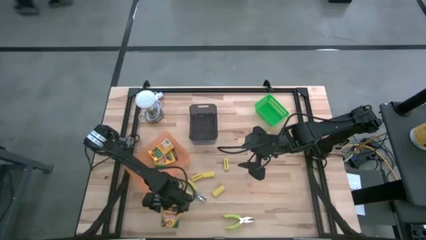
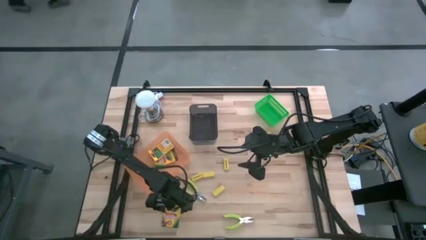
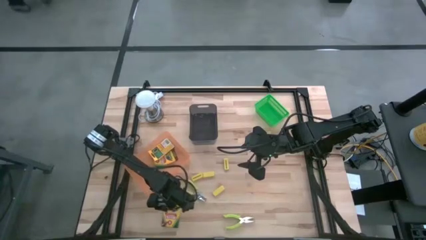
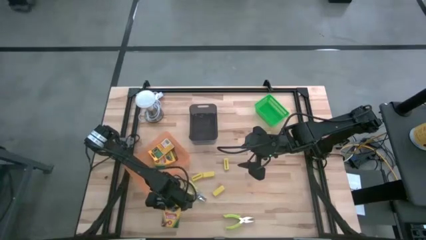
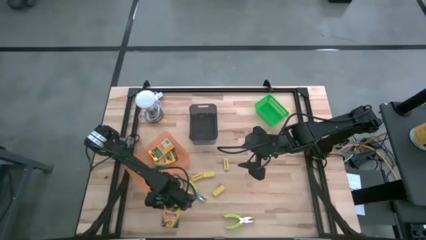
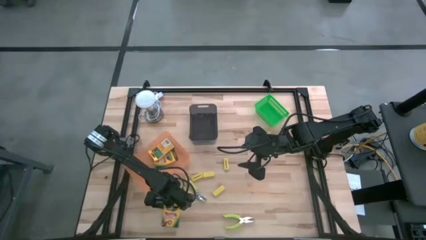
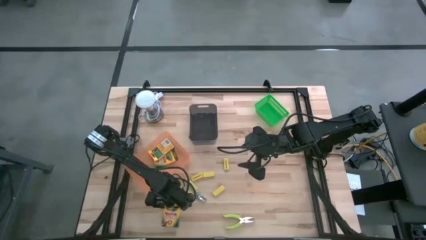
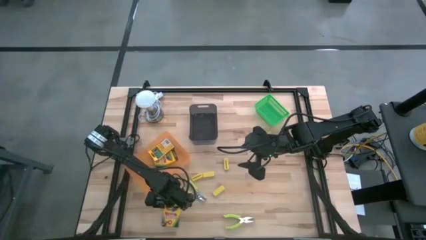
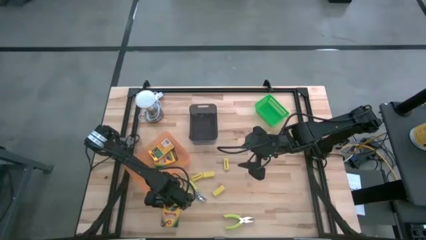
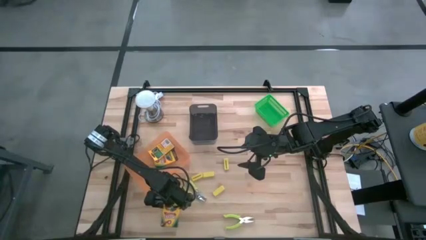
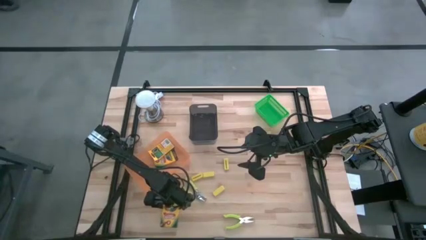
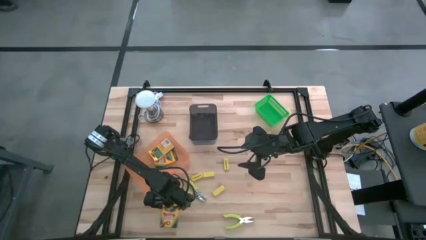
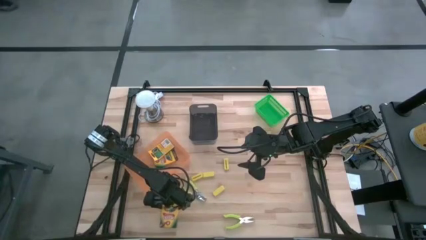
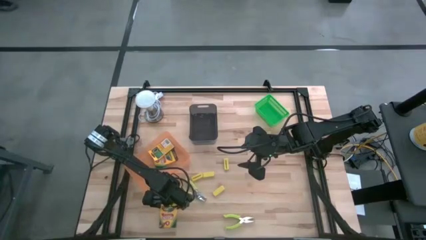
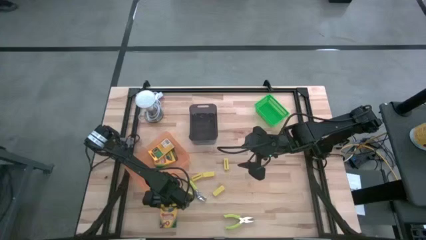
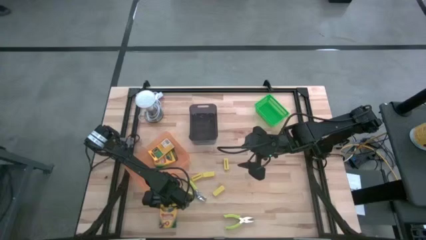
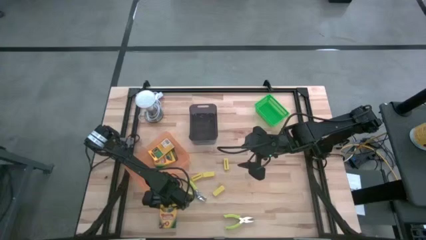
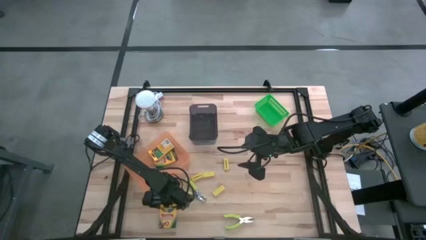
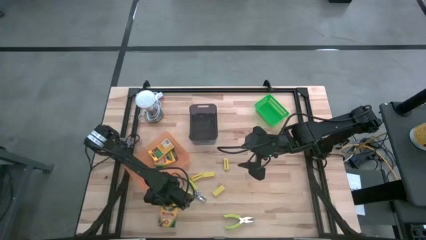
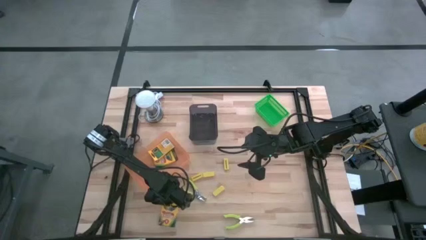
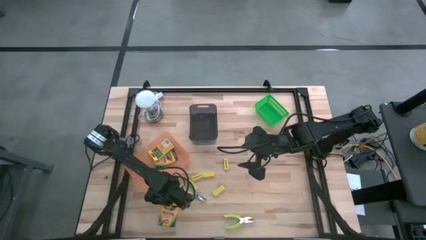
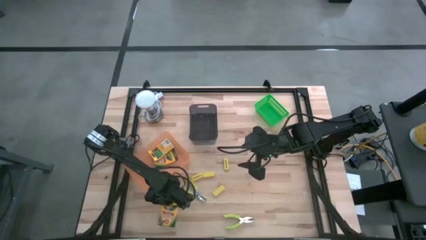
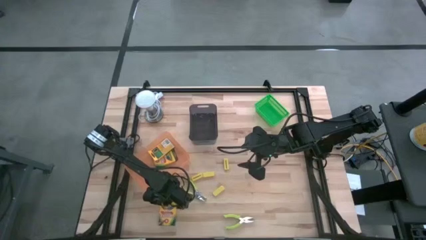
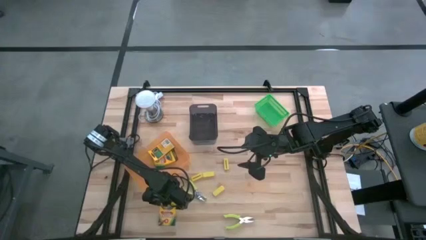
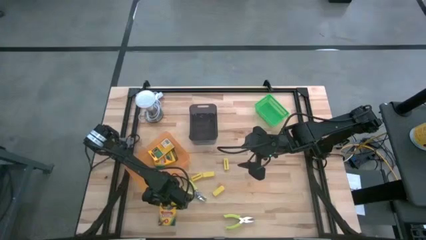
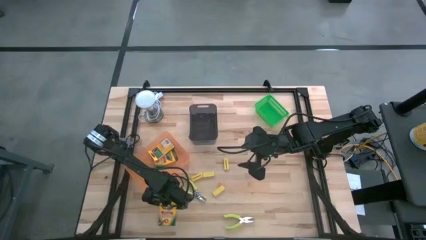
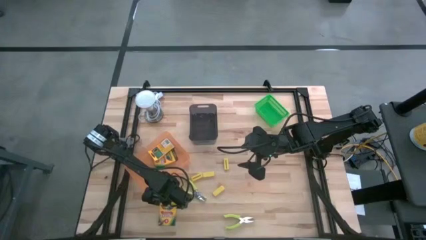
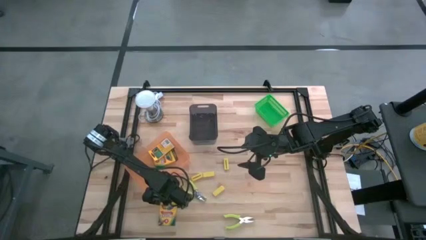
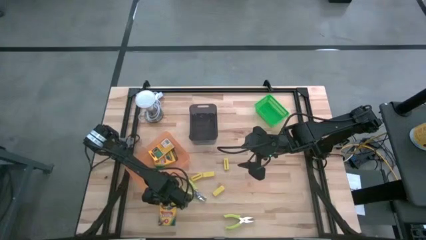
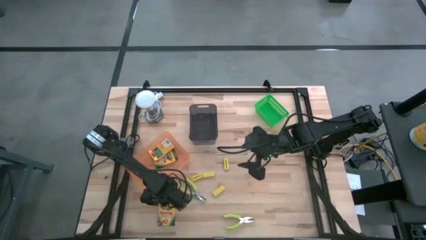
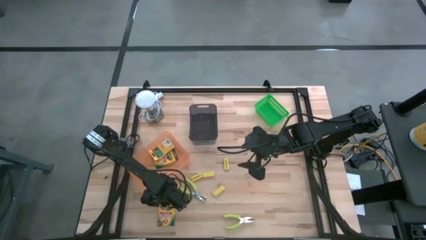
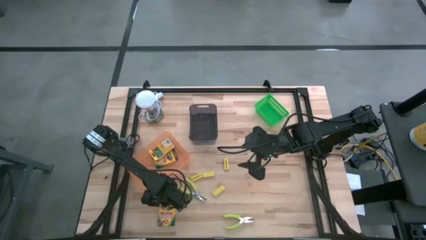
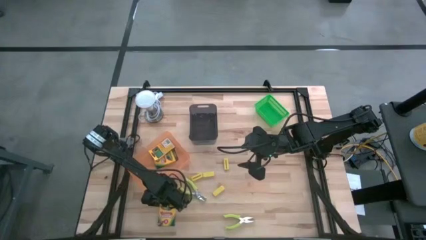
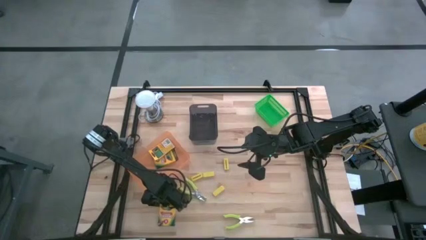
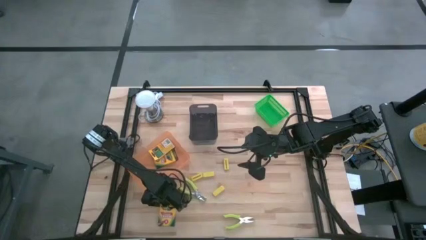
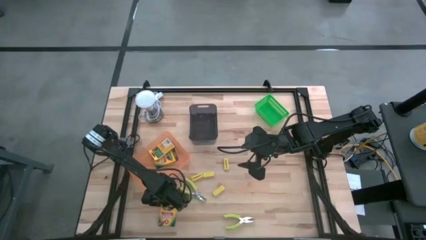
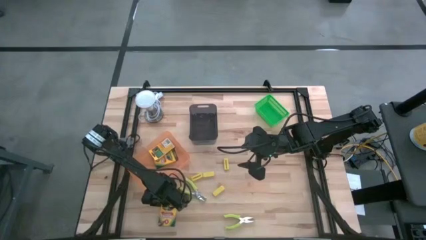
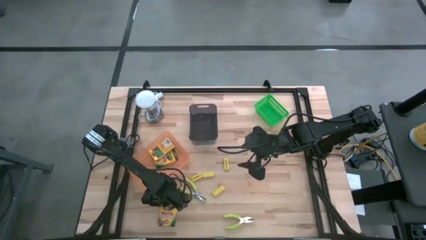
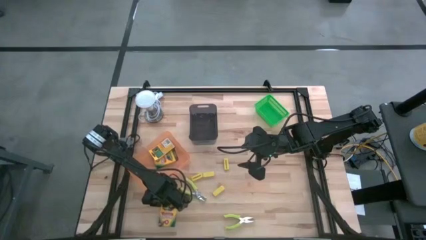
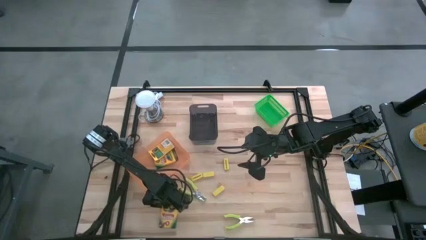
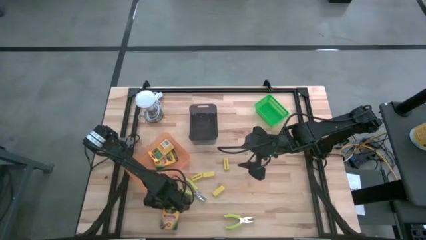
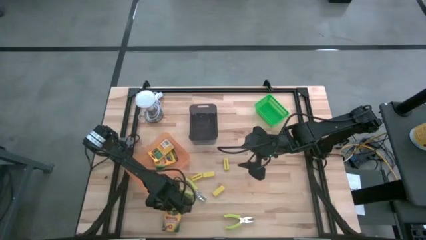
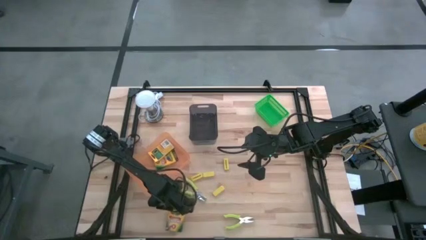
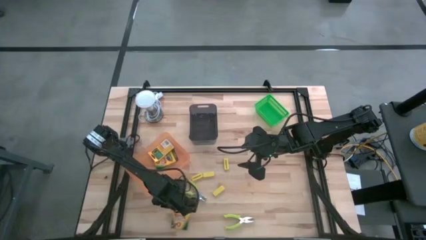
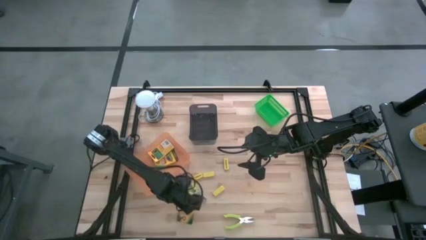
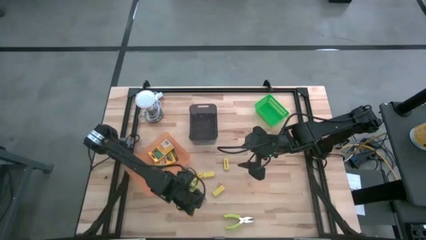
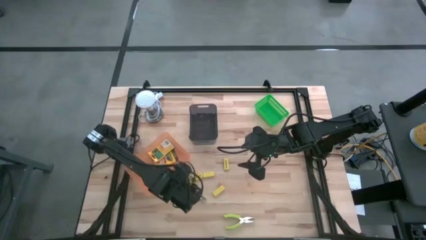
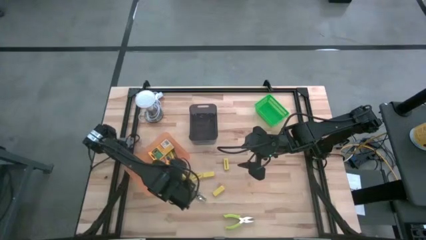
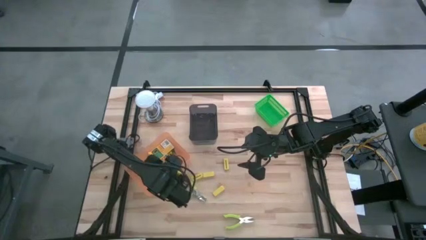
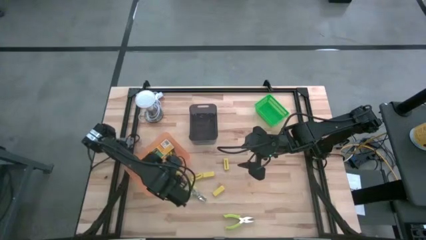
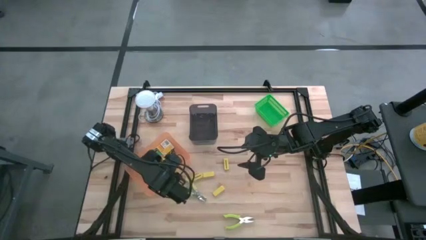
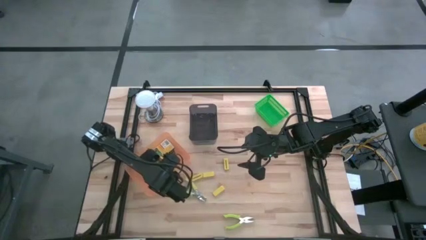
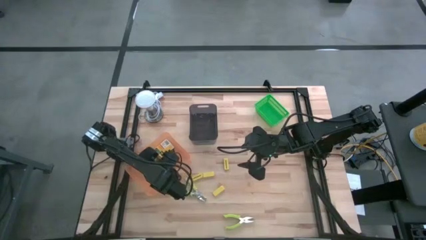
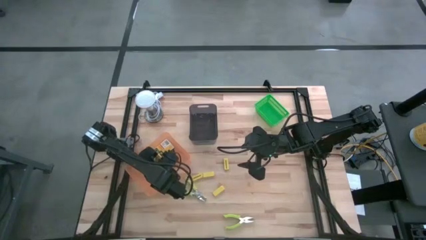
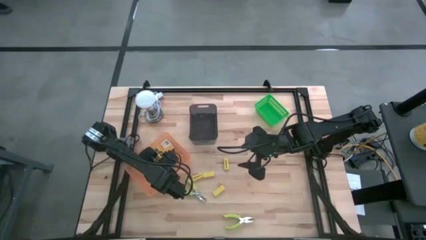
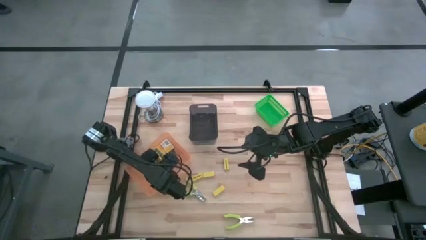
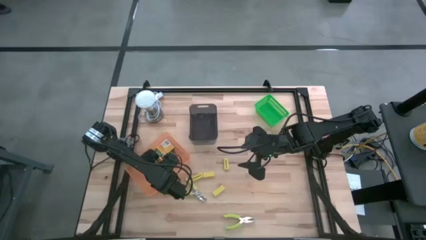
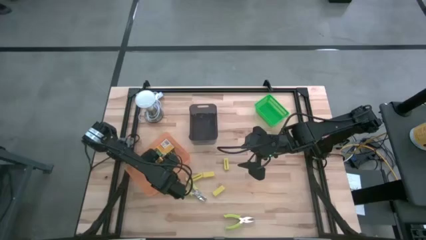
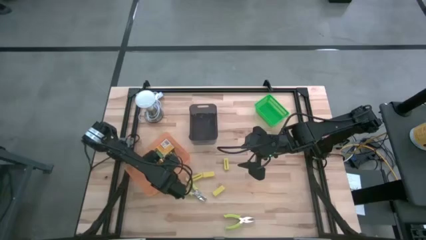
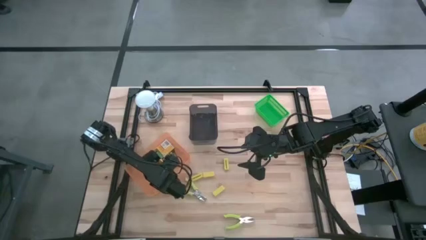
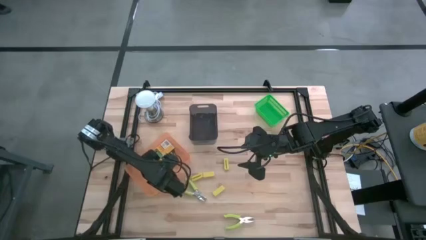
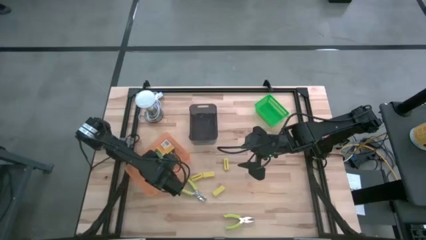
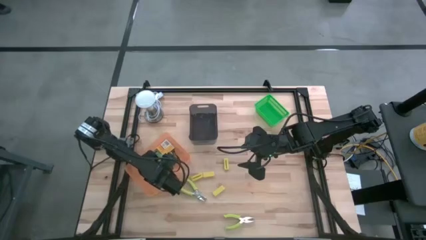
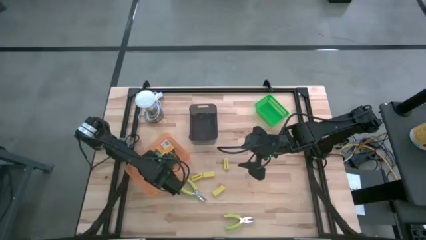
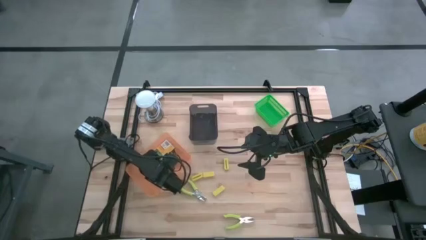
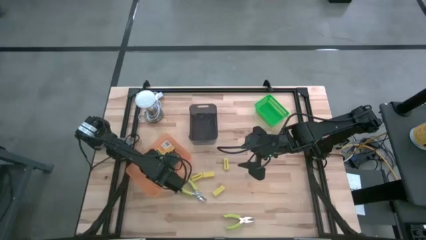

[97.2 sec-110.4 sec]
Task: Pick & Place School Supplies
Put the pack of crayons into the orange bin
